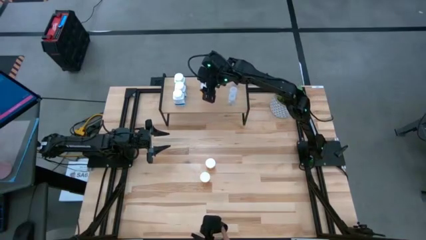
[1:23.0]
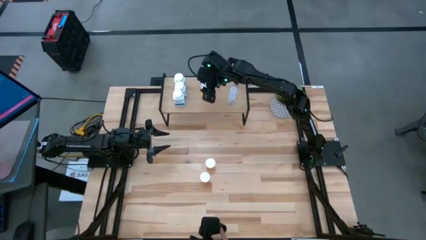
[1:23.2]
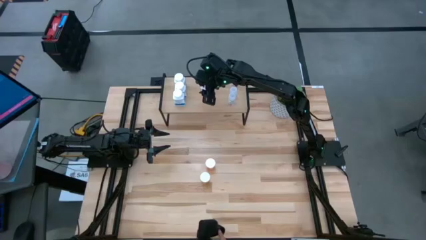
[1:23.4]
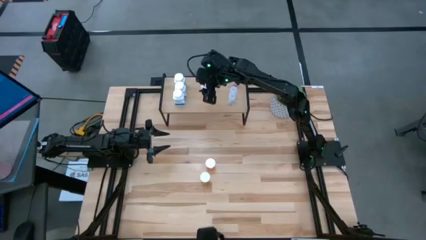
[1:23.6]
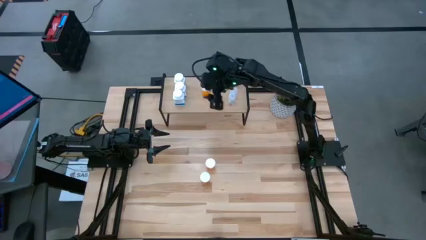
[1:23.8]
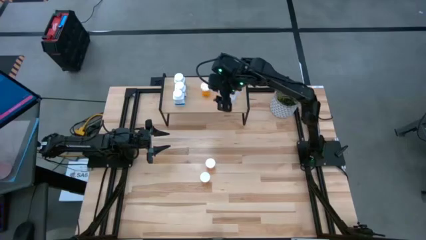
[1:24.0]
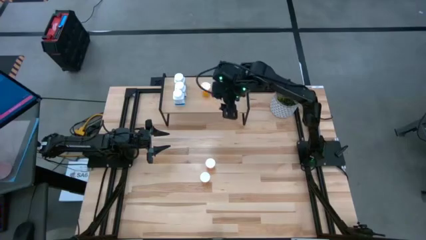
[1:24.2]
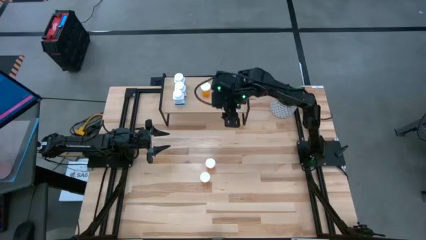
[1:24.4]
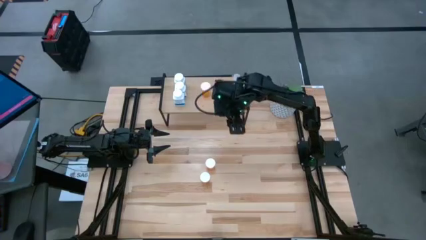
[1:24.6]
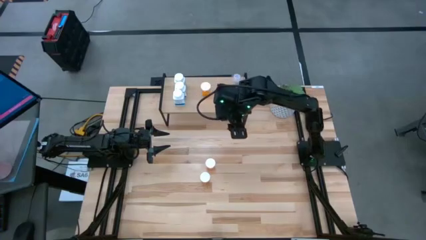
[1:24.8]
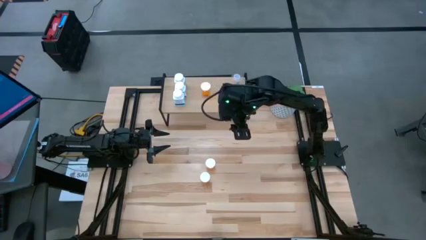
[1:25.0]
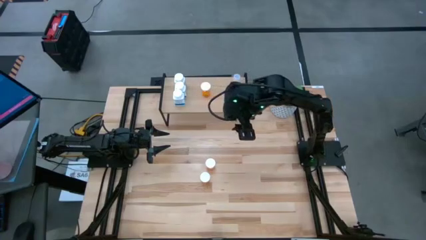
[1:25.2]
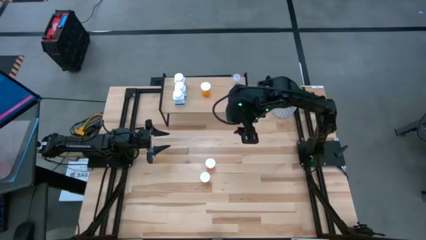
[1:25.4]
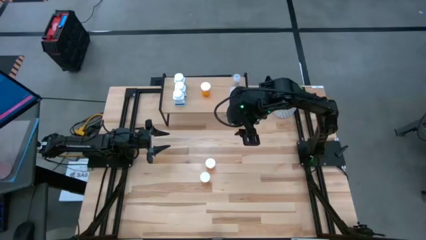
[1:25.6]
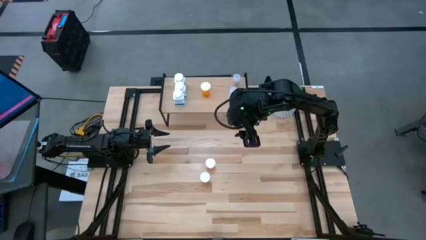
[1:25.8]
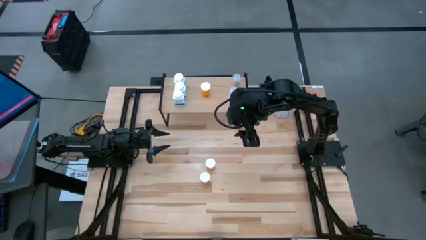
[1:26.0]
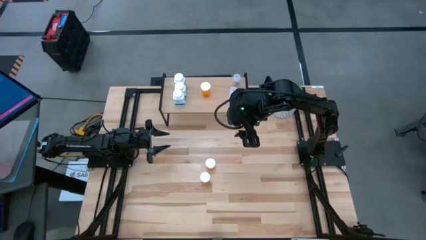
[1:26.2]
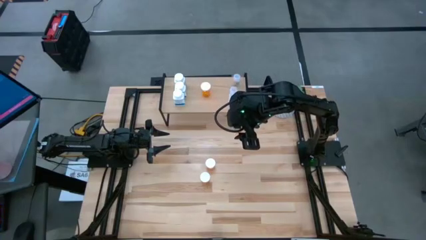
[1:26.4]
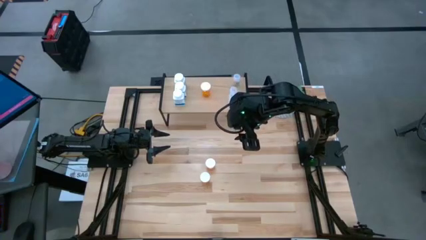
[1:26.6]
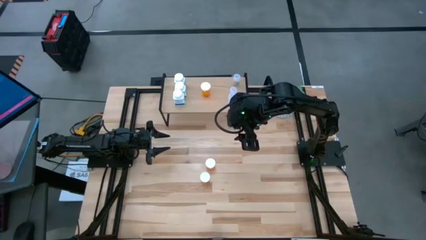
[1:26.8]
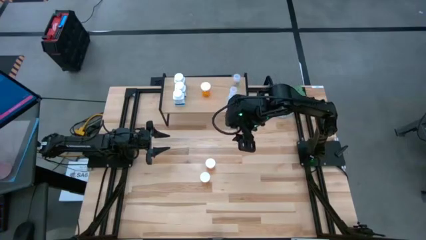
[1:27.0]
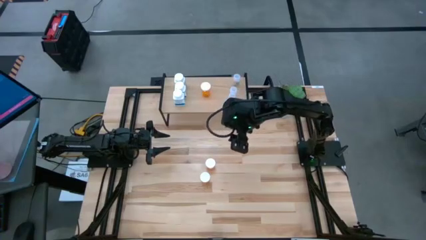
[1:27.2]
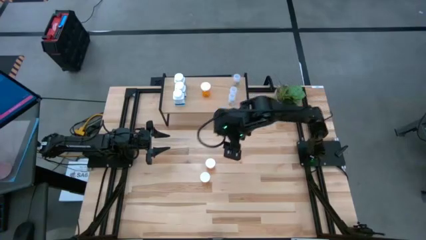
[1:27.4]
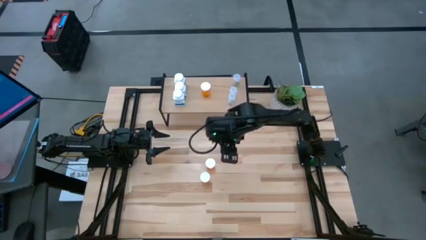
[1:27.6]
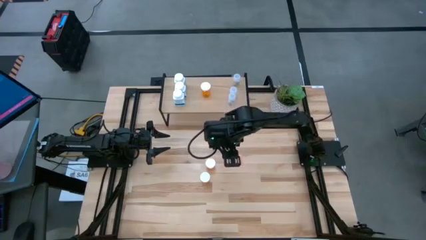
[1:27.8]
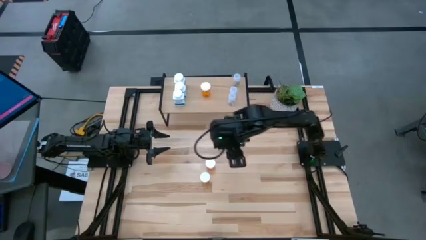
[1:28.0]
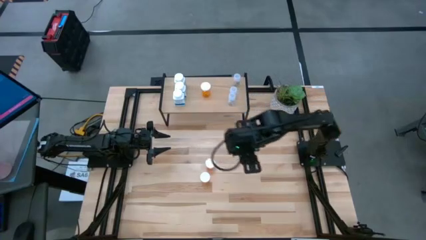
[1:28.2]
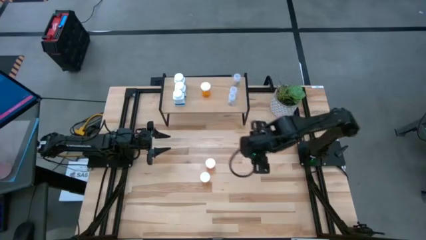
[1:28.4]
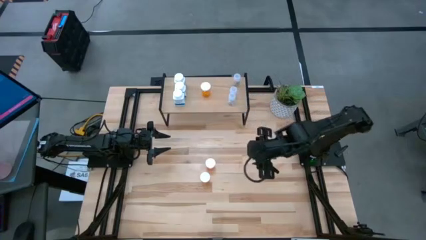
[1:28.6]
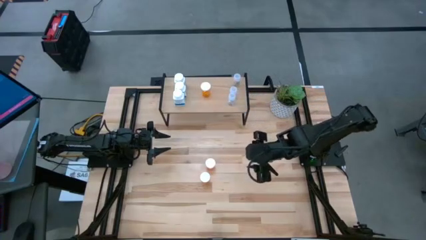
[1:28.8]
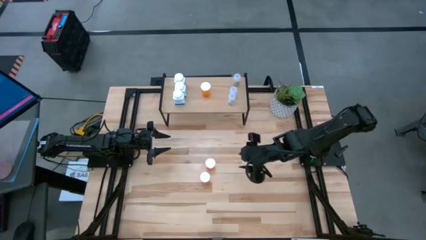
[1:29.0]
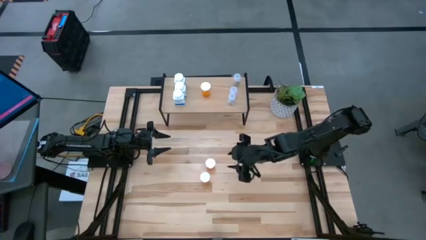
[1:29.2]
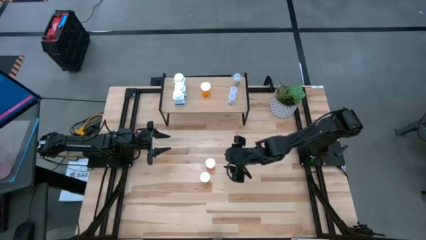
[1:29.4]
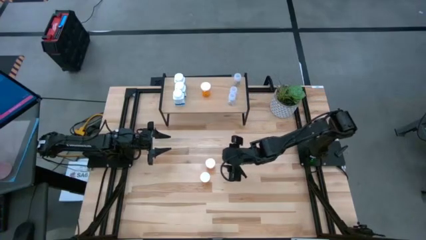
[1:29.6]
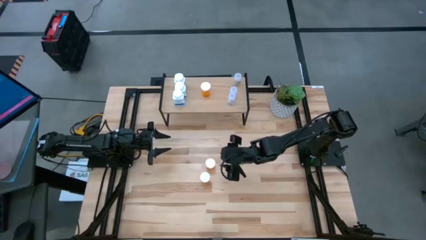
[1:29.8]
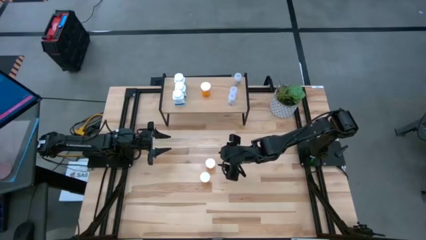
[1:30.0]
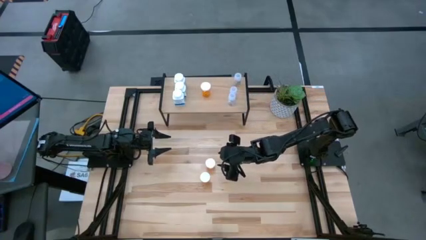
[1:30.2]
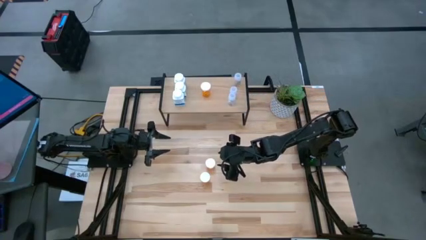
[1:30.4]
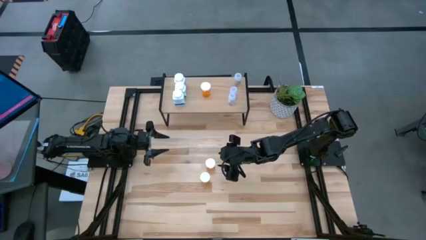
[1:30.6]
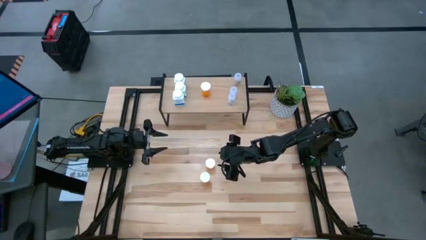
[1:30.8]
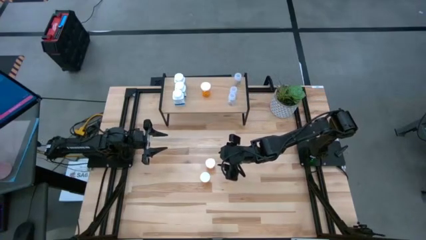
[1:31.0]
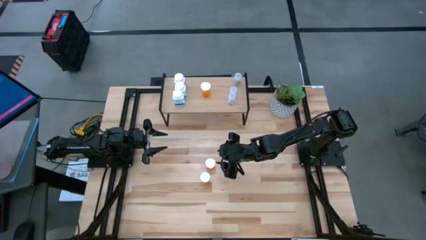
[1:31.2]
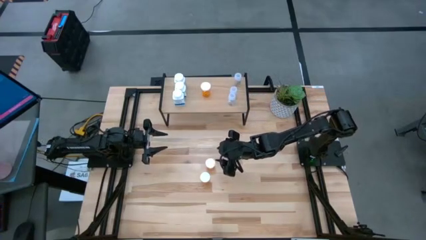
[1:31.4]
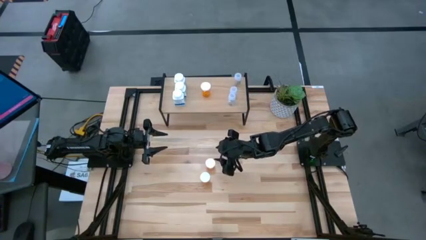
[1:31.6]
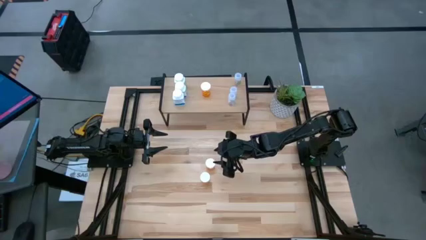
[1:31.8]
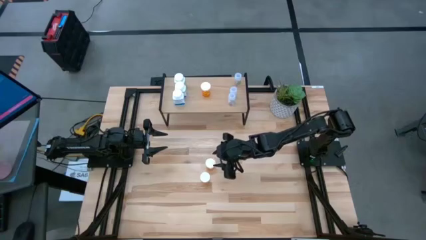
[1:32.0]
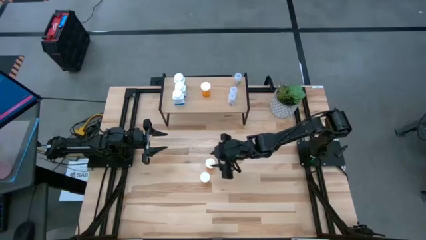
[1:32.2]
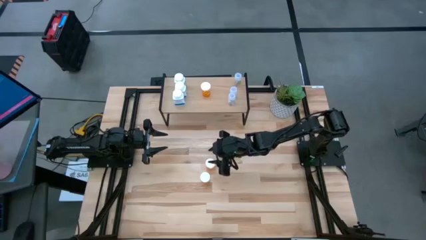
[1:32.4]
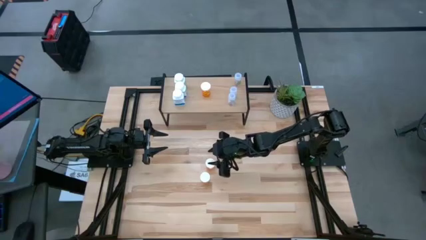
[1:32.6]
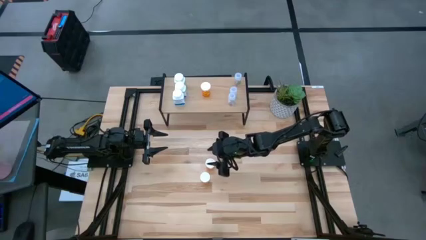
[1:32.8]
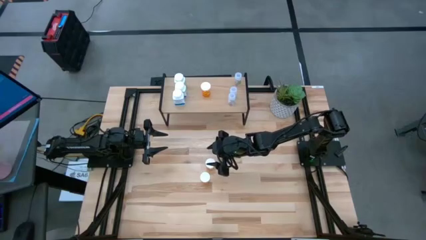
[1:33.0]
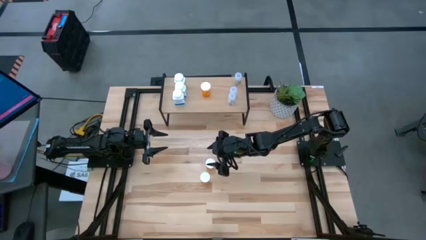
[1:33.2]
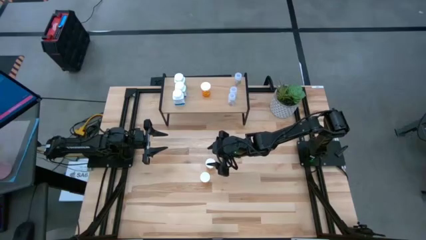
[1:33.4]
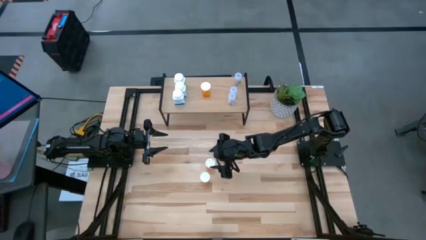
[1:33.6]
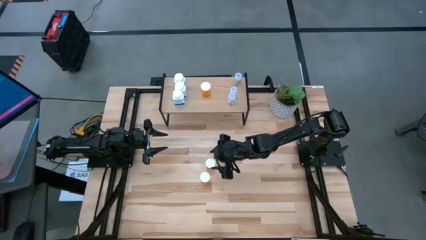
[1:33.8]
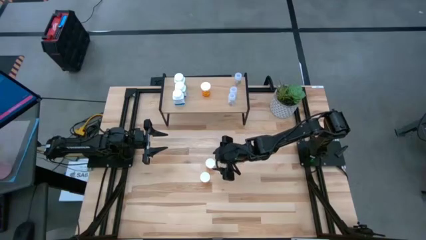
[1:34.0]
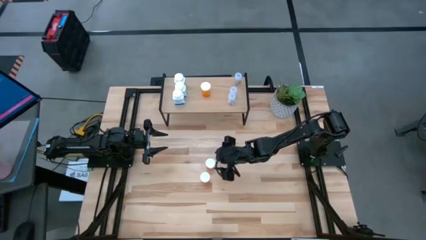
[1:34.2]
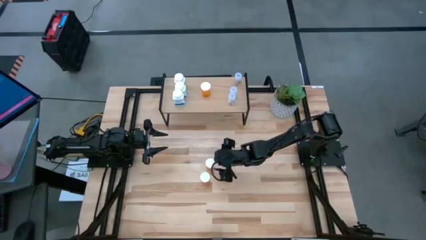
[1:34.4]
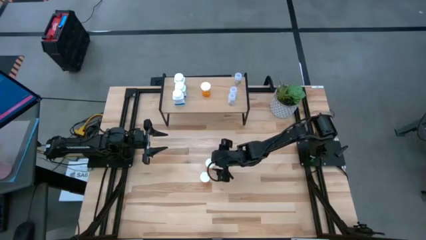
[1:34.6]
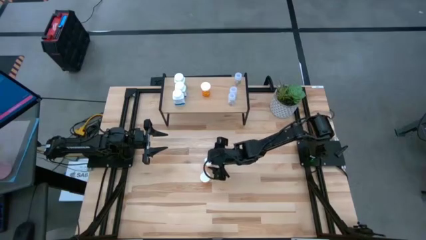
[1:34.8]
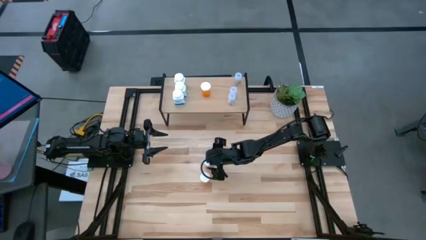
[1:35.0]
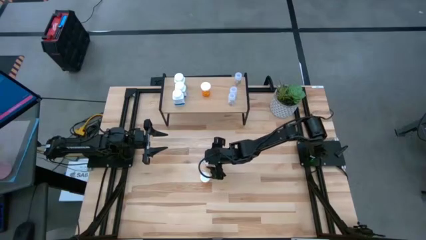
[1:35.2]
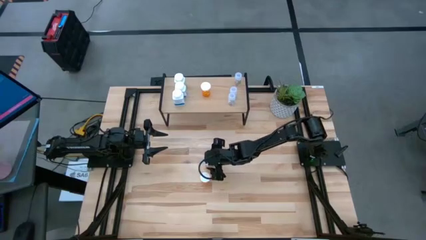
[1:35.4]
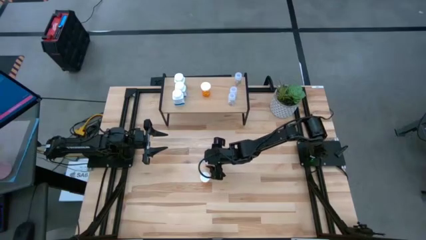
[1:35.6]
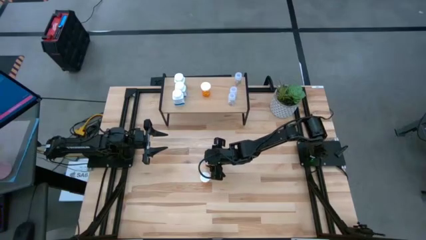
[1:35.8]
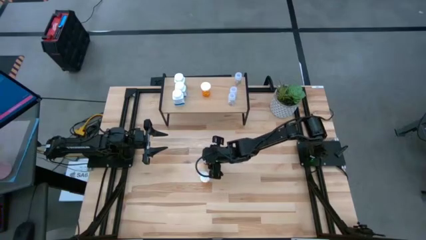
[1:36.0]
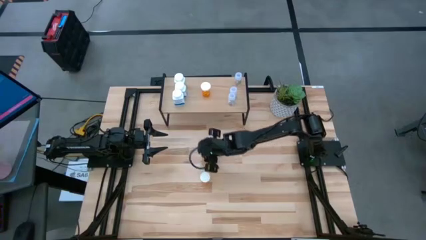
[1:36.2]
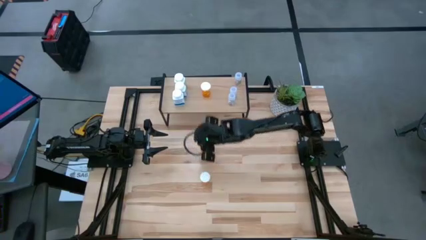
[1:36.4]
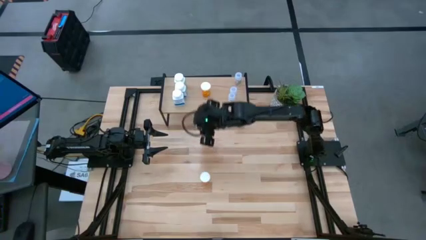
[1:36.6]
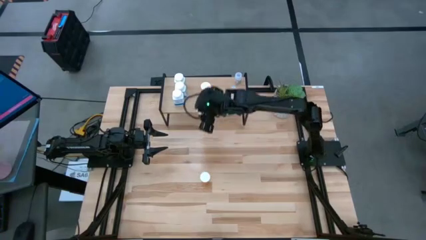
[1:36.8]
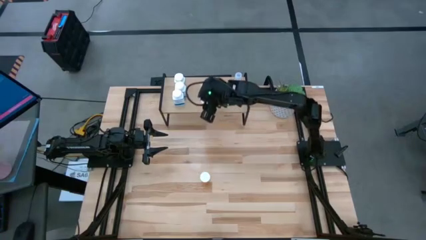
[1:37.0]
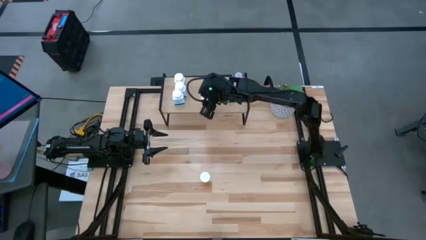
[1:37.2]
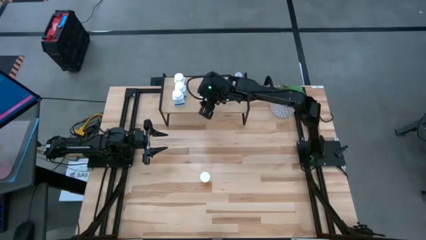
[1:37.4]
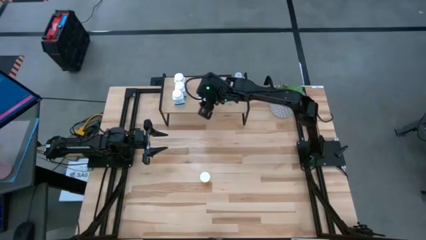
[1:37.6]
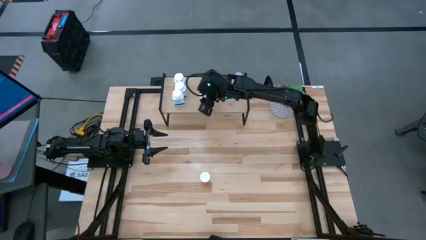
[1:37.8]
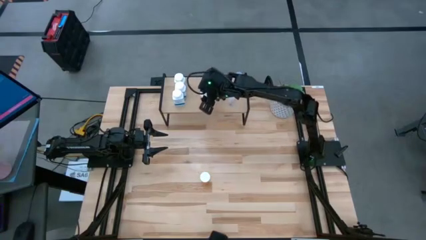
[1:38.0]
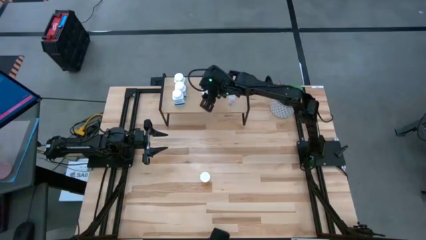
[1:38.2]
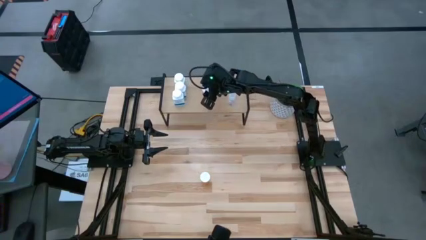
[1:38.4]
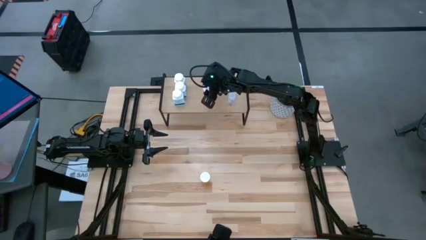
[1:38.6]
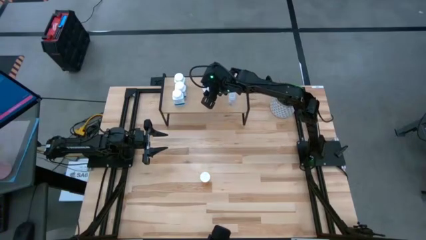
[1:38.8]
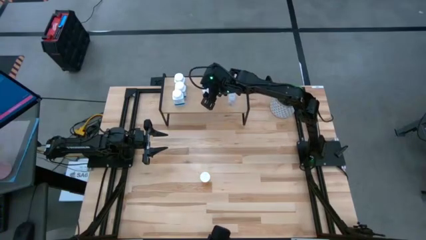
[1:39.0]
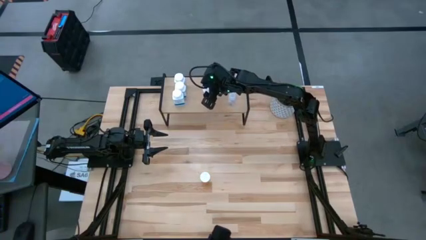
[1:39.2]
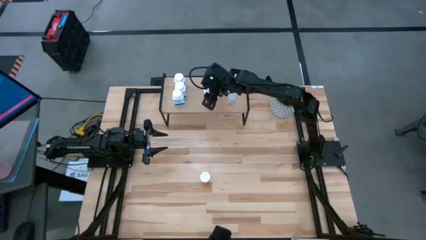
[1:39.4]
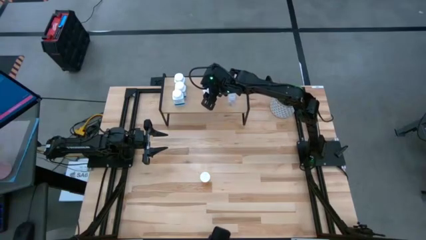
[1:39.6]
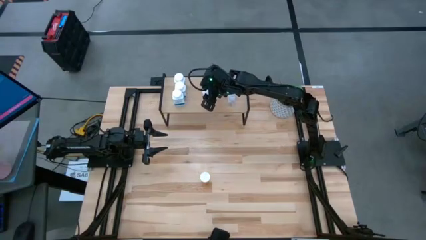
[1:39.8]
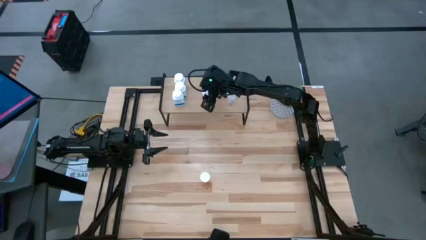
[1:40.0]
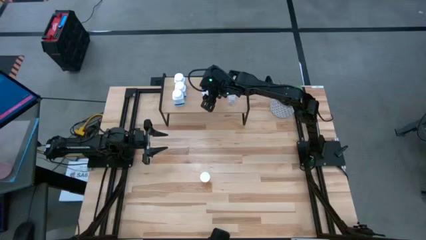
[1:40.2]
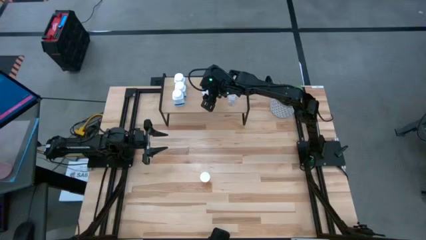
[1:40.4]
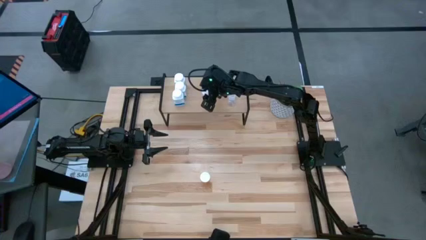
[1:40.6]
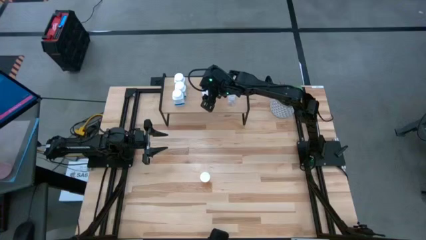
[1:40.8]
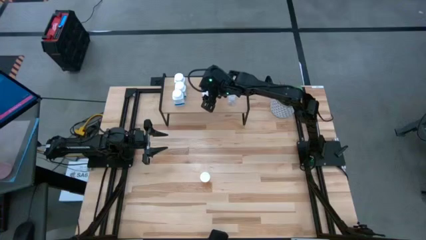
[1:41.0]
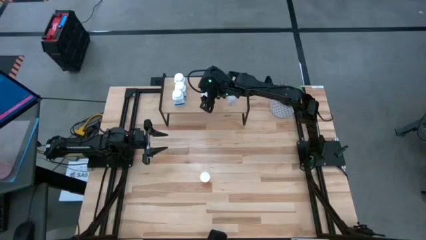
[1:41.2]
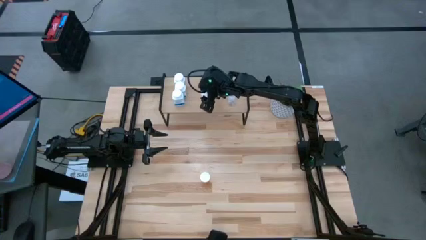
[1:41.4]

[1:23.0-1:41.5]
Task: Pick and place medicine bottles onto shelf by color
Put the top orange pill bottle aligned with the other orange pill bottle on the shelf
